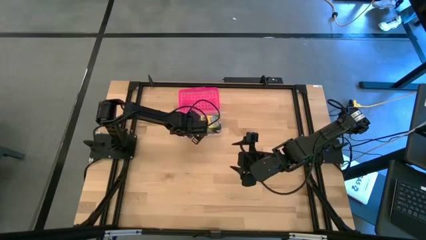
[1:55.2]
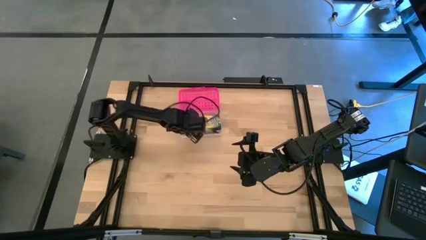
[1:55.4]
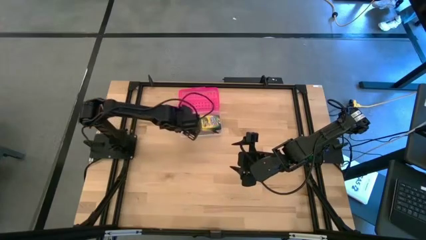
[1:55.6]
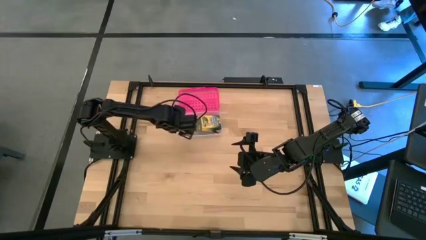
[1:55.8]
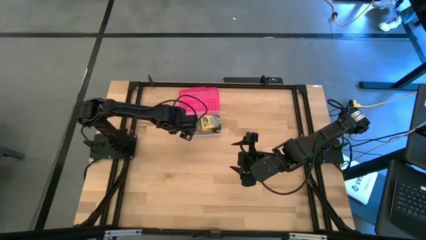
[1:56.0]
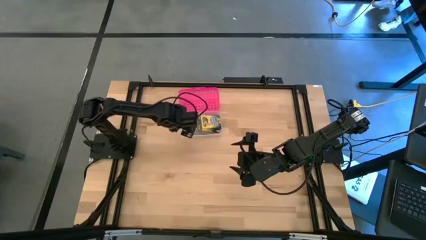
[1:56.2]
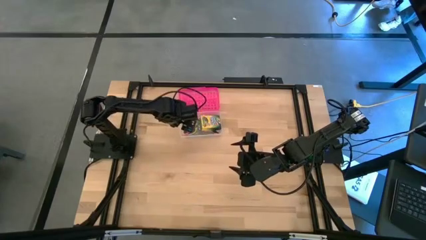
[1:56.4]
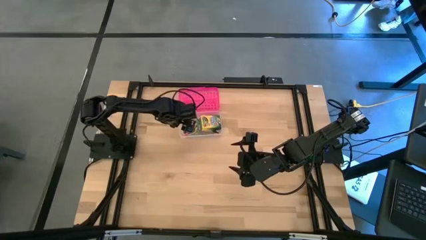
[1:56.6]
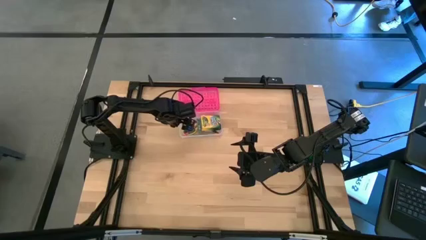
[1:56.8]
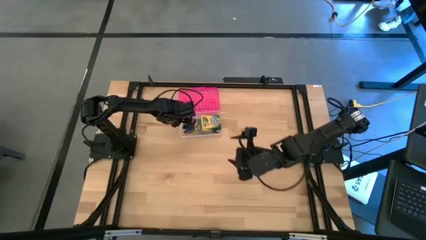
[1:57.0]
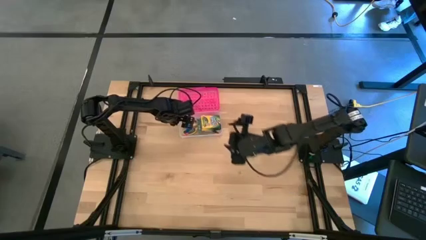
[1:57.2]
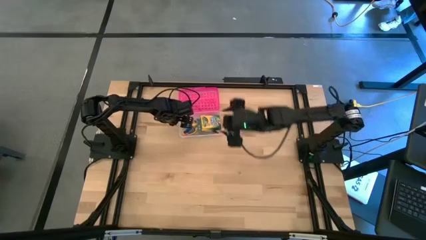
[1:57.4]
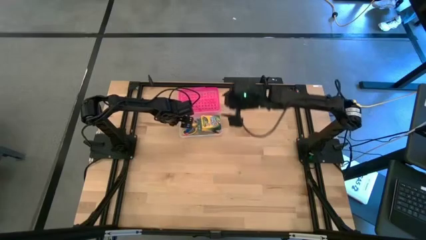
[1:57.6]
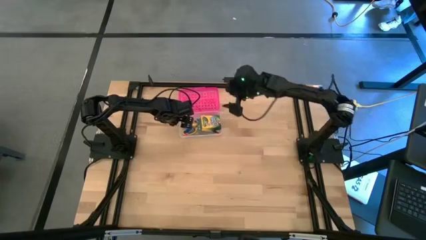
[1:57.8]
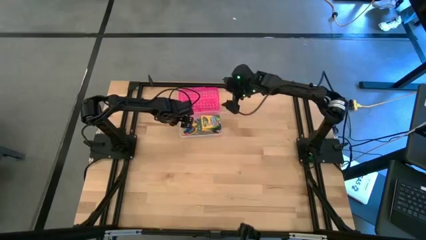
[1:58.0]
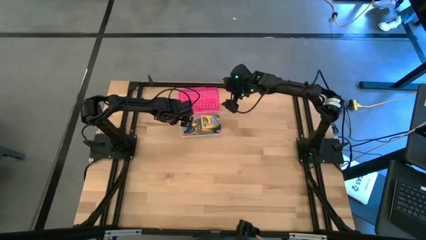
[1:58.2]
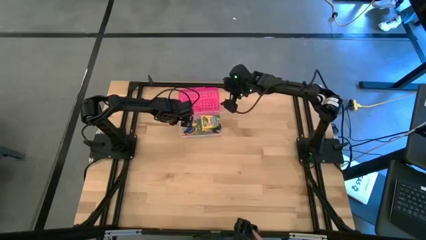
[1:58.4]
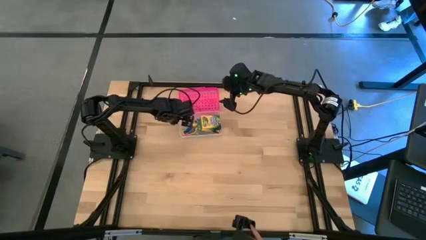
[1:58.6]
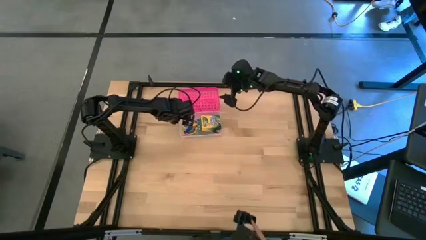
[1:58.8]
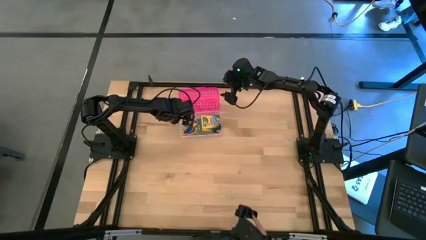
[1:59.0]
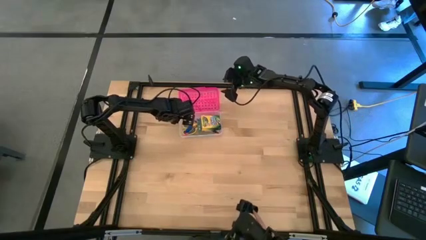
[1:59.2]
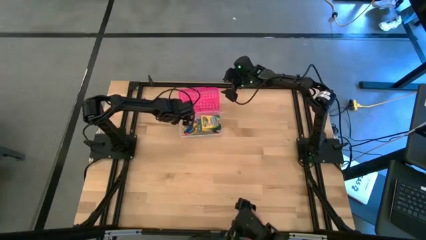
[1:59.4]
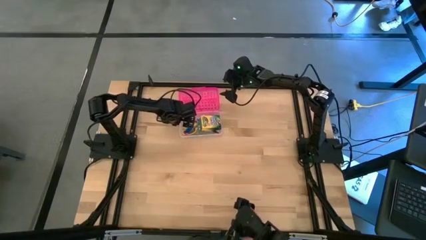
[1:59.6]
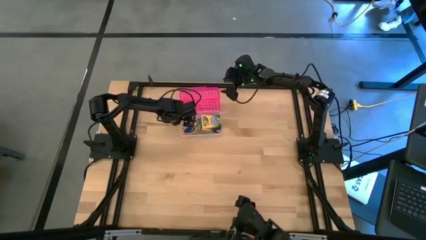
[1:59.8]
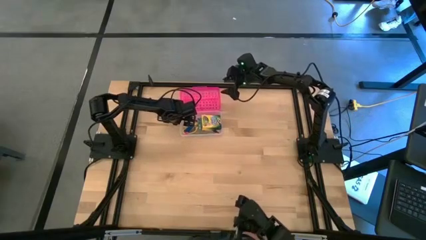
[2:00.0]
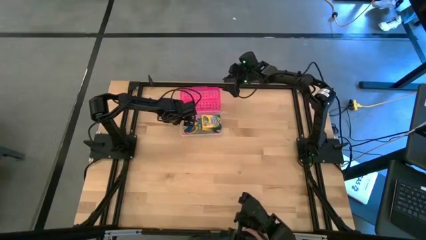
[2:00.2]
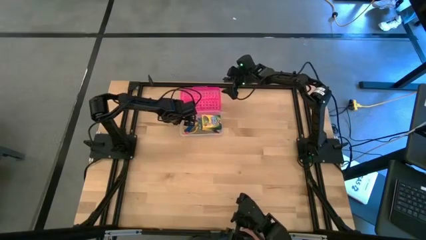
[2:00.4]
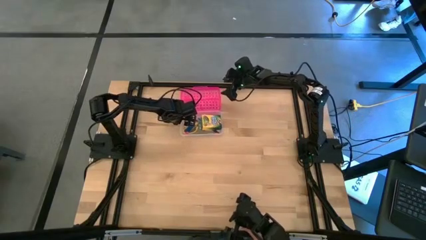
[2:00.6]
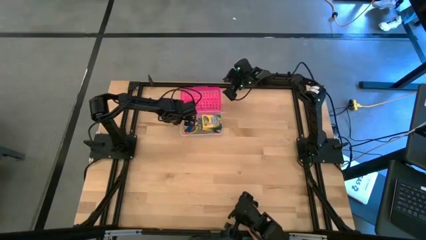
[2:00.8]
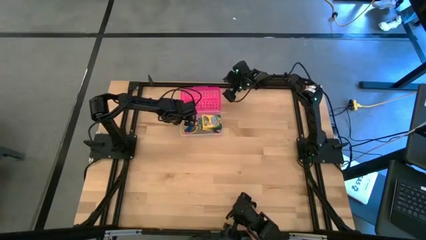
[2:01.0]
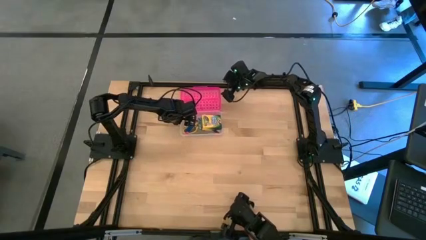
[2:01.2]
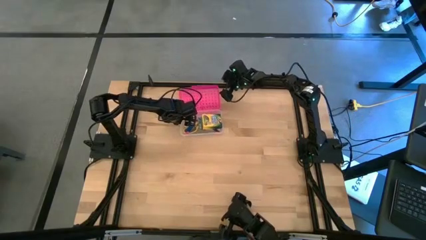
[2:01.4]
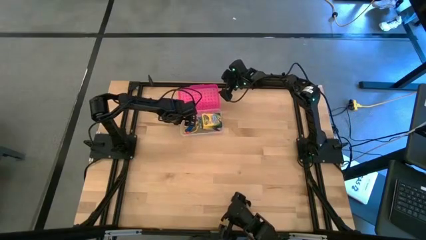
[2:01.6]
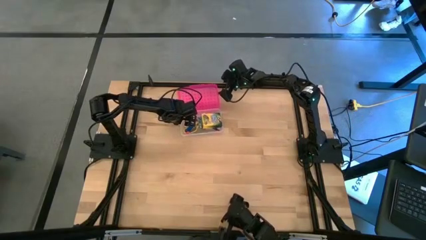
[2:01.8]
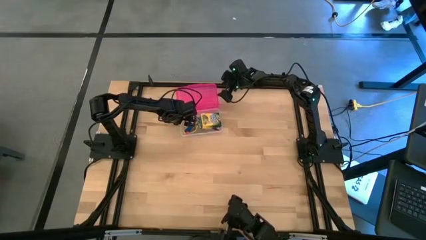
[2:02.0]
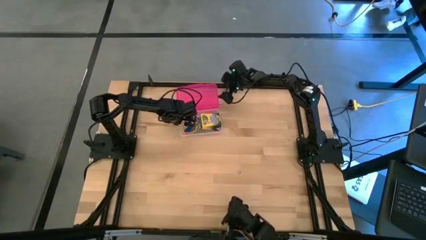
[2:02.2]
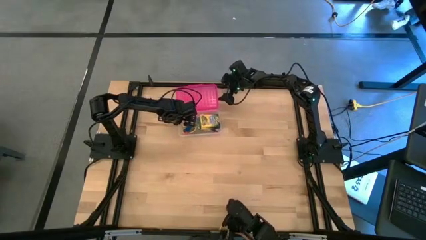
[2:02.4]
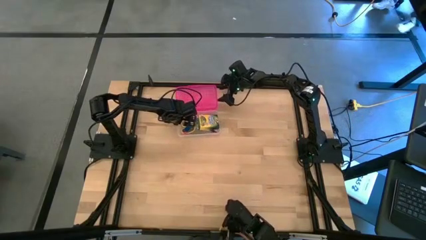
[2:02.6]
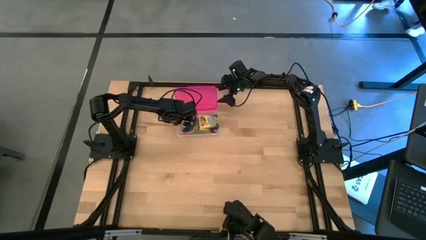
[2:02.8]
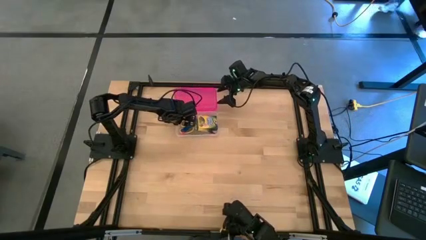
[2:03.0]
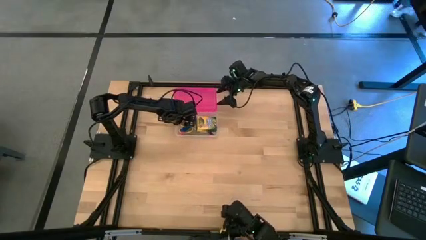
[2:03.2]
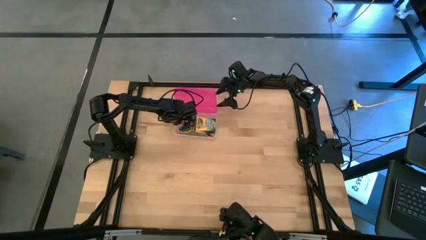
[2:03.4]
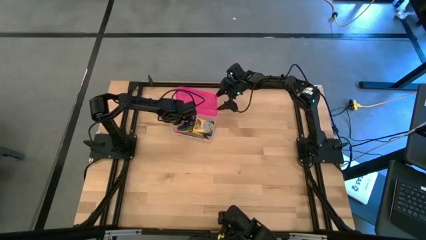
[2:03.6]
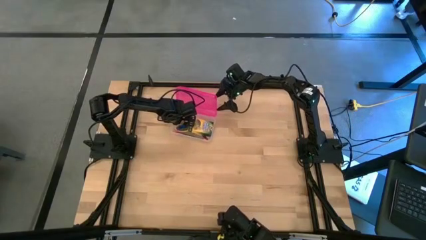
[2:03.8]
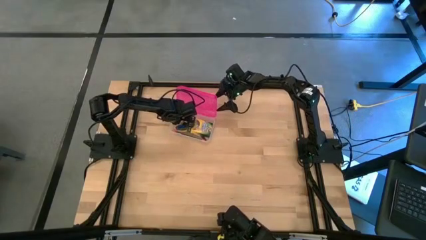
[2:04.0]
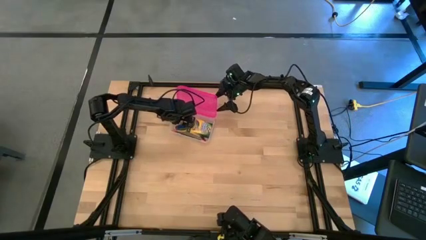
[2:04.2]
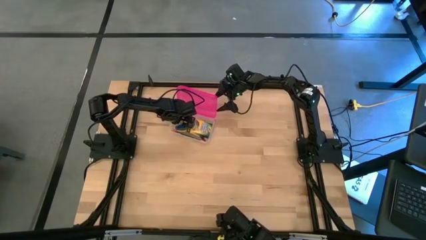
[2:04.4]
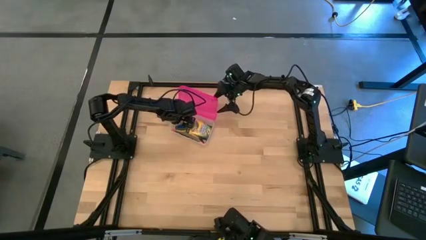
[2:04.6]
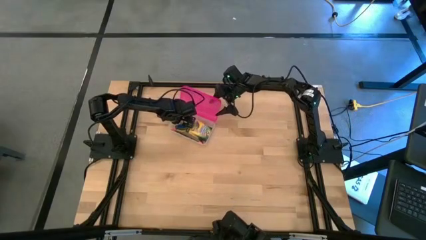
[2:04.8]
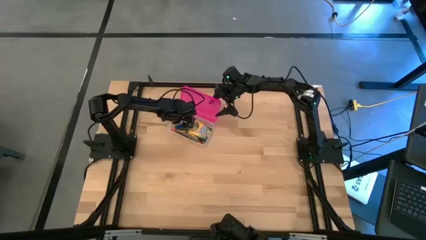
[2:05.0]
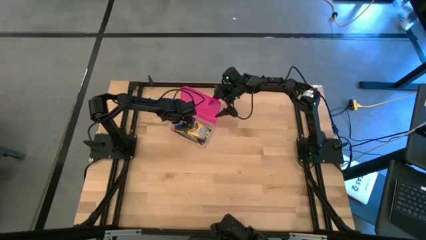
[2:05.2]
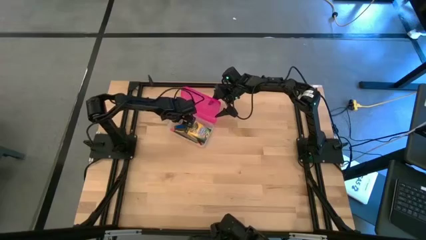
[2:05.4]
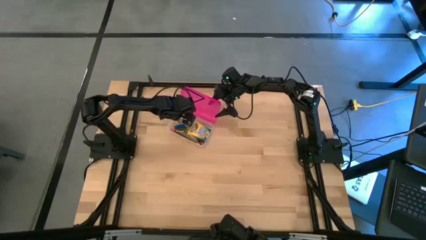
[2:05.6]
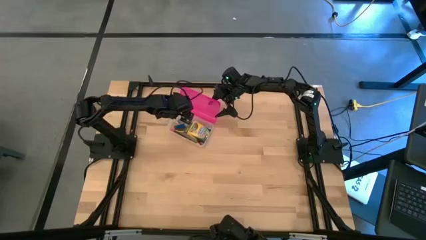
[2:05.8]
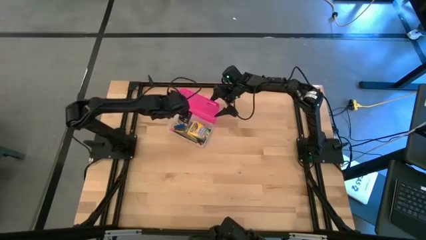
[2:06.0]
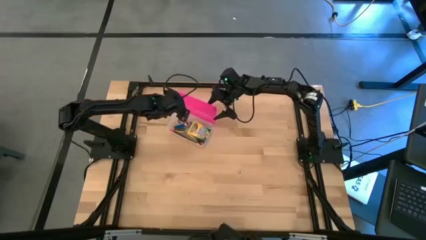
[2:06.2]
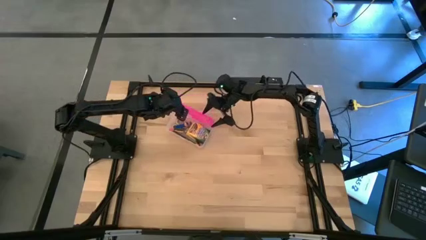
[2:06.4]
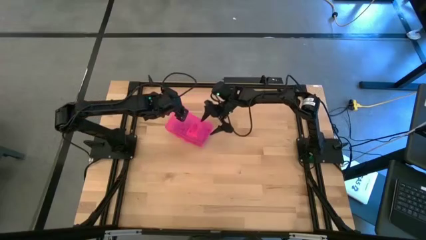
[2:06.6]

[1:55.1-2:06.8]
Task: Pack school essentials
Close the pink supply box

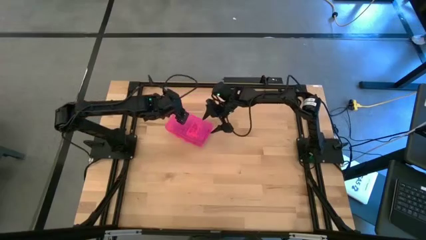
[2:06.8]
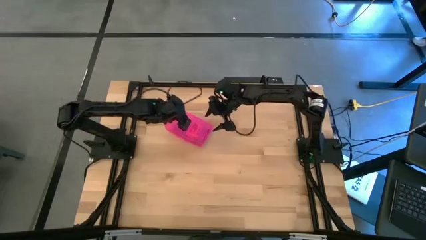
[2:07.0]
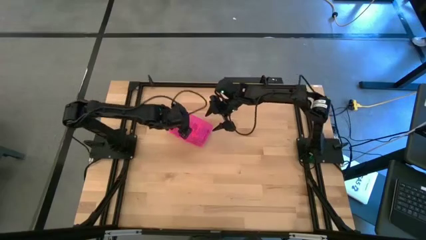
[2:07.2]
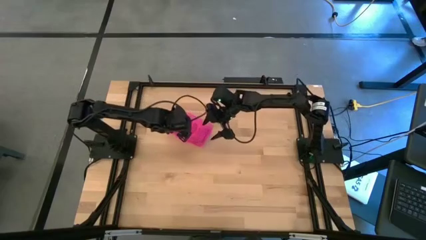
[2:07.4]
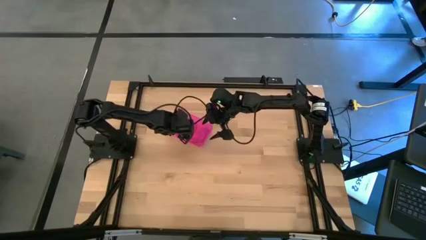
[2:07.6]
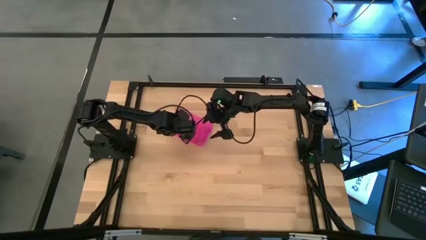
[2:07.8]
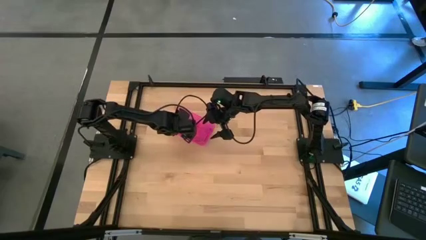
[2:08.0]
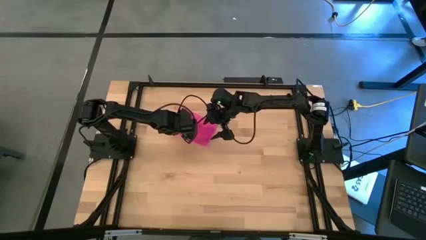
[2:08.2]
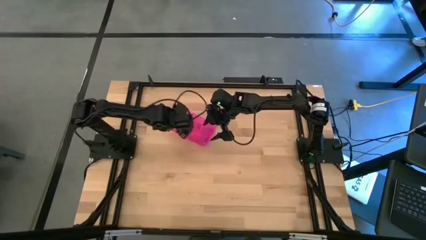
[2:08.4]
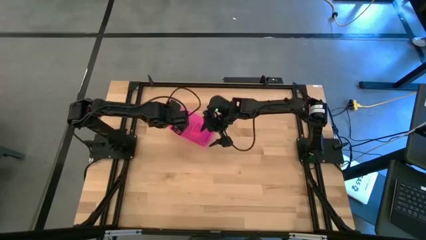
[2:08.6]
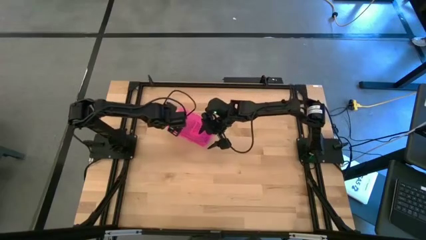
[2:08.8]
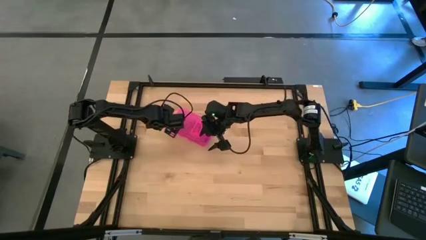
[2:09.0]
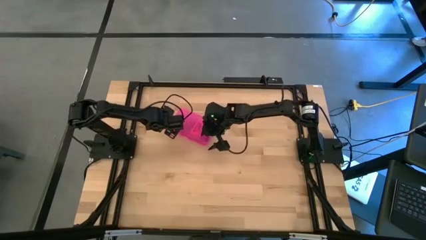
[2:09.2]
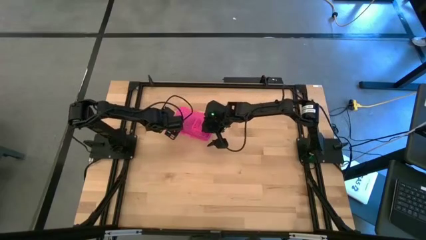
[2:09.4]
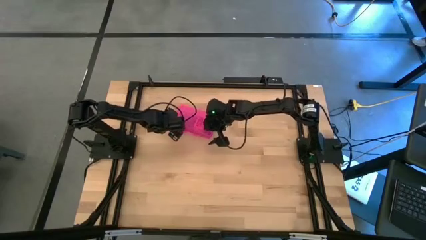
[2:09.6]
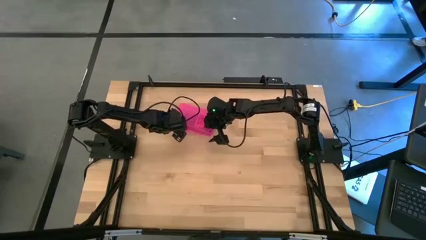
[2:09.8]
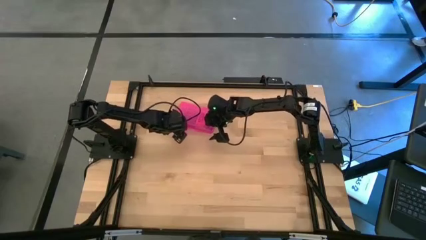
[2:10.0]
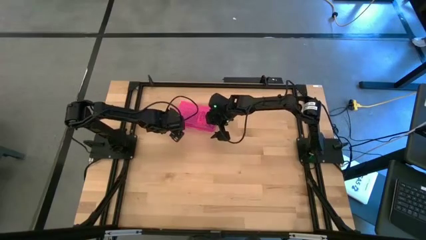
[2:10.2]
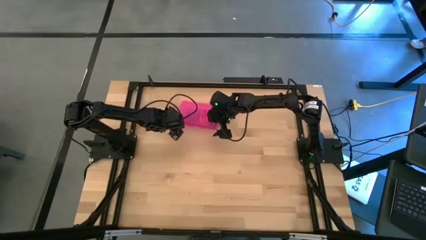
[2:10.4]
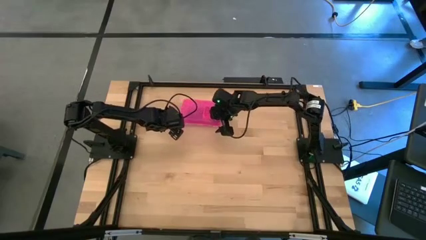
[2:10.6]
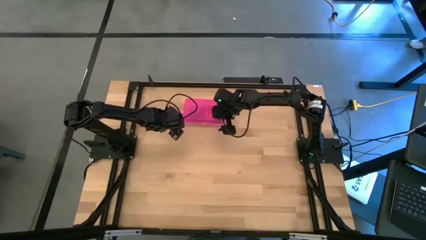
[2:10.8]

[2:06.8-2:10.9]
Adjust the pink supply box

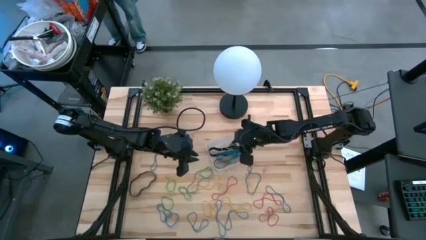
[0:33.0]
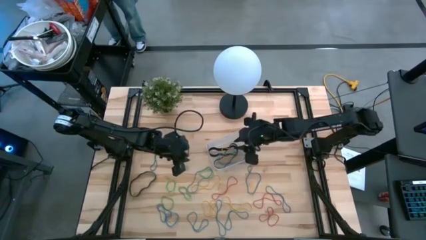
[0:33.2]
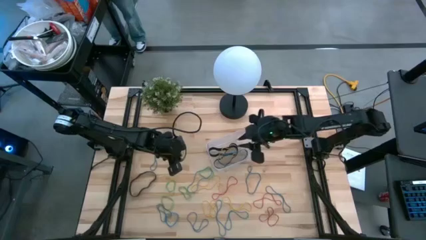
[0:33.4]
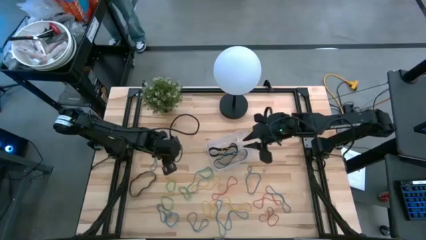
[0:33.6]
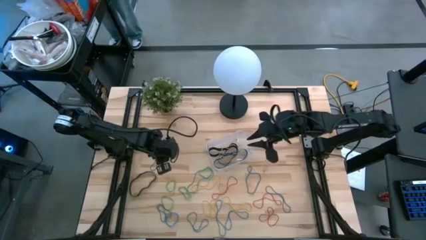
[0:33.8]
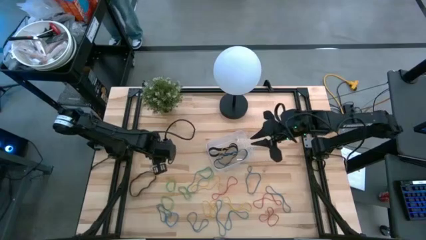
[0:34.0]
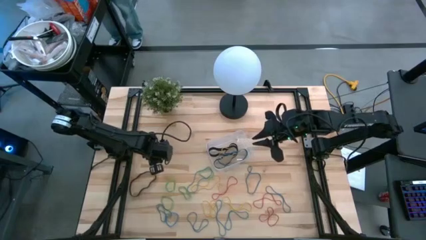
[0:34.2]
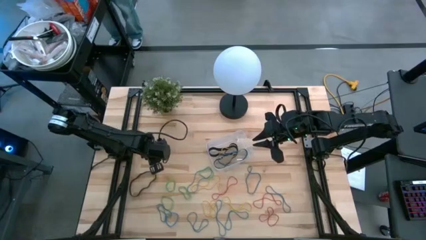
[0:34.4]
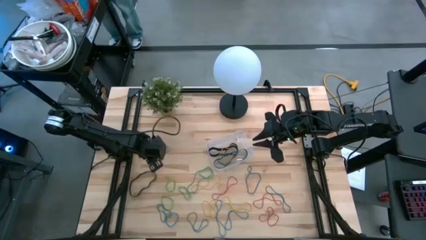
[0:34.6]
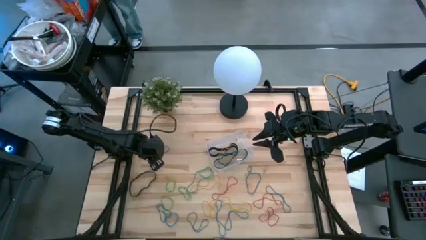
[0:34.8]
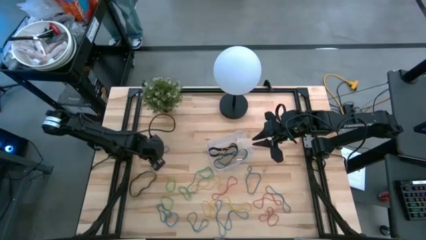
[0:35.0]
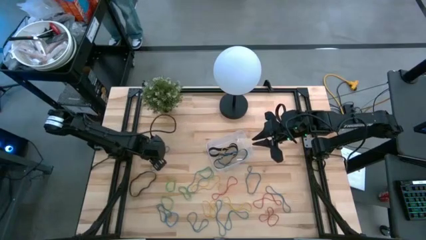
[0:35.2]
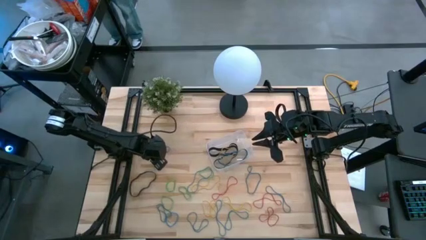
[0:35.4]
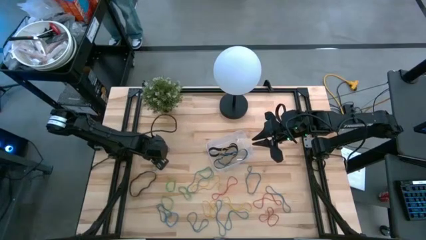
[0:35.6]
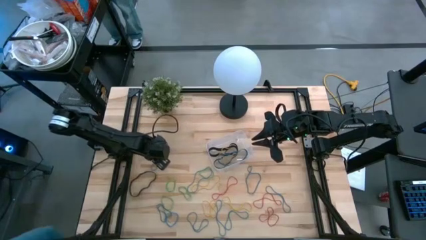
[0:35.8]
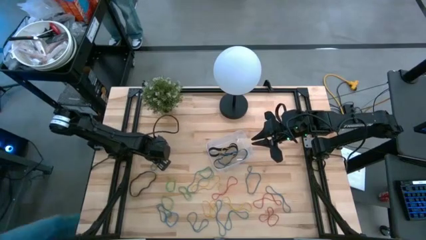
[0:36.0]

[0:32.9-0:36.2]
Task: Pick and place rubber bands into bin
Put the blue rubber band into the transparent bin
